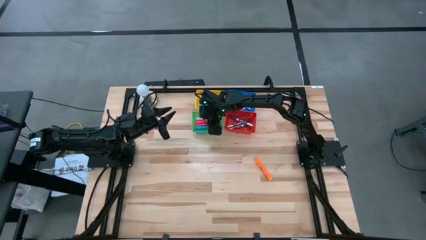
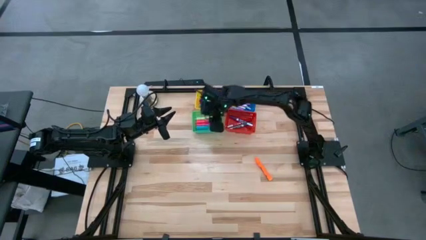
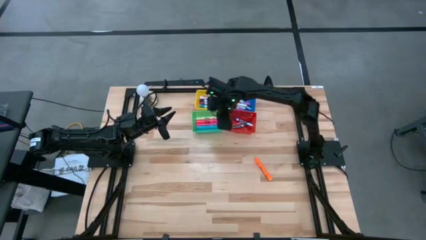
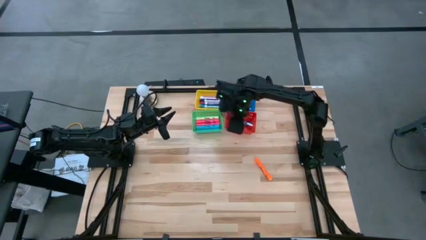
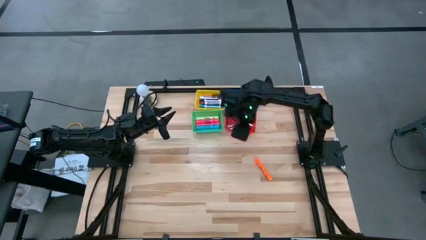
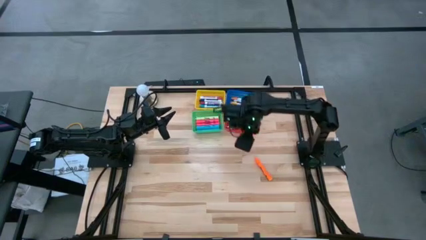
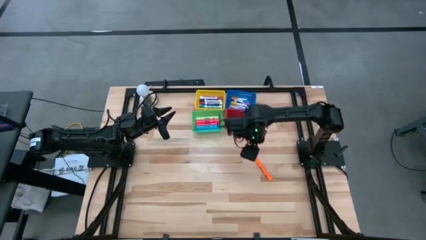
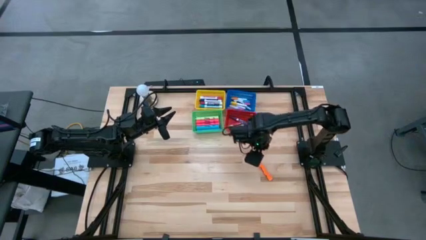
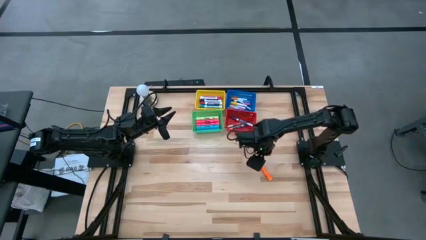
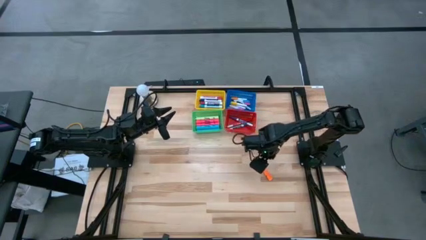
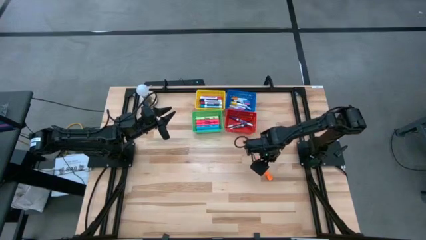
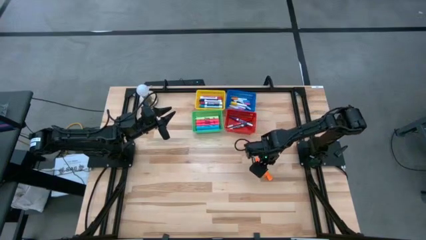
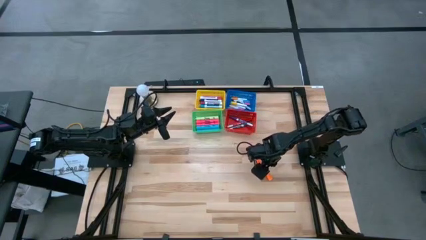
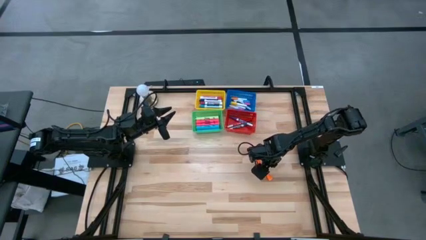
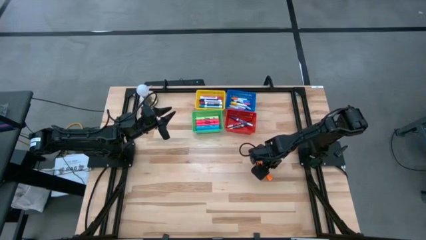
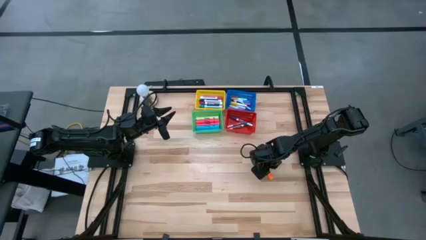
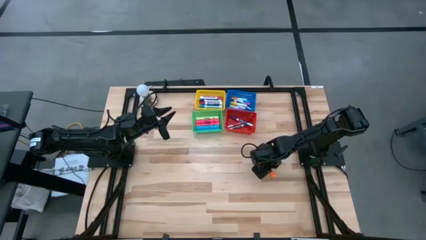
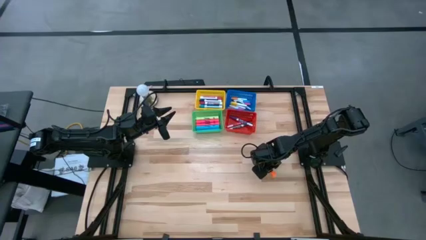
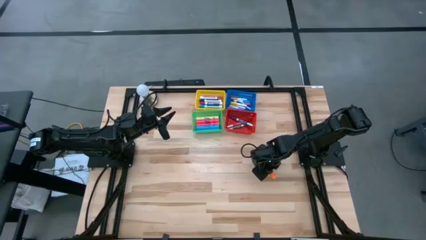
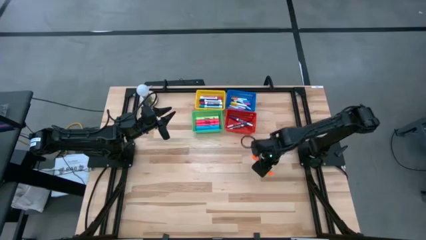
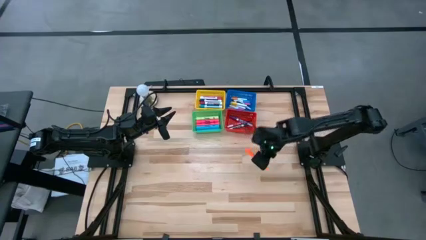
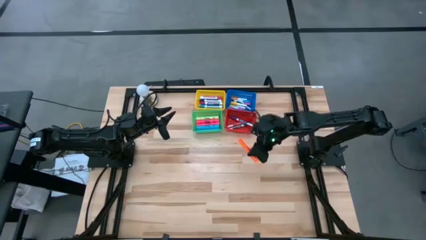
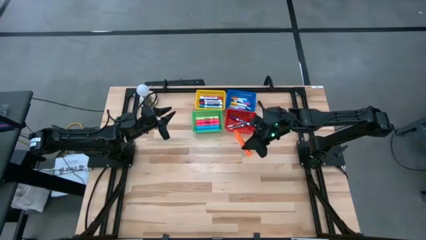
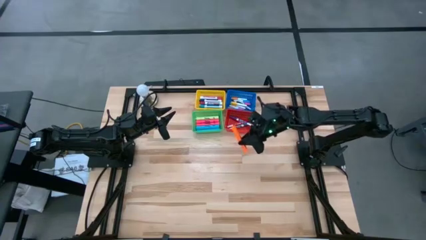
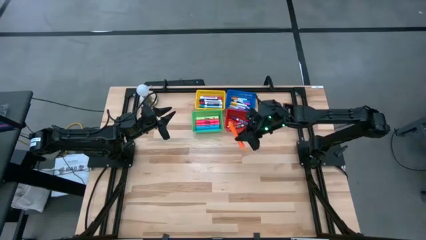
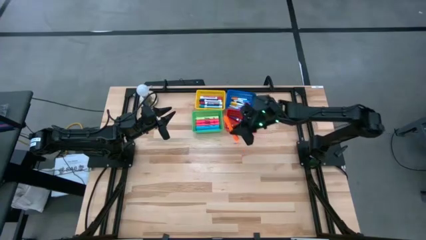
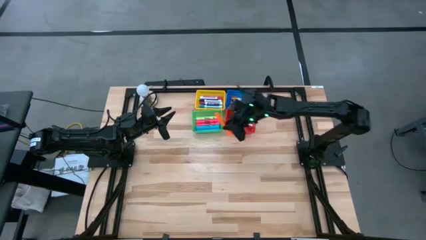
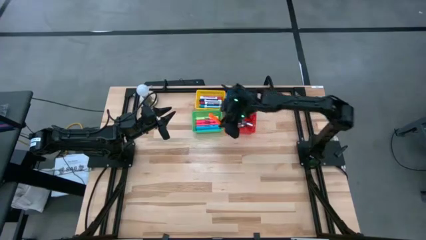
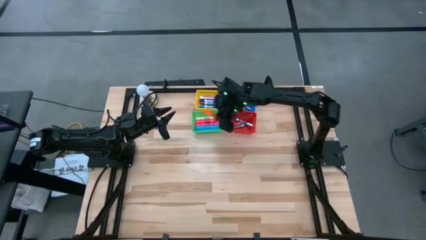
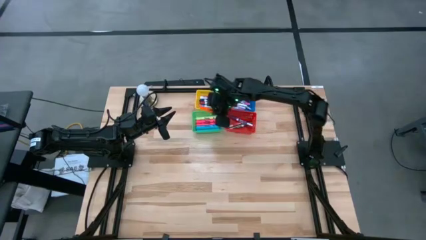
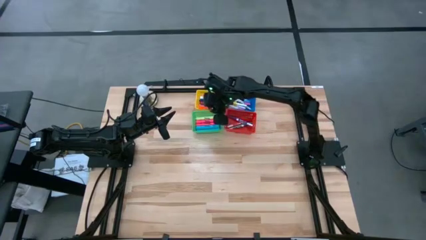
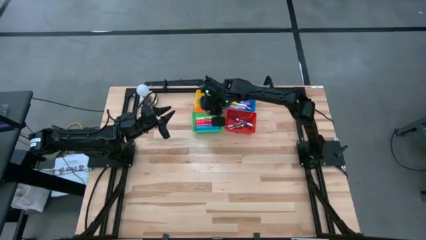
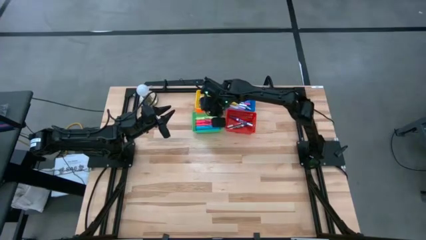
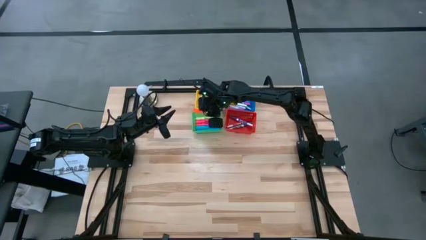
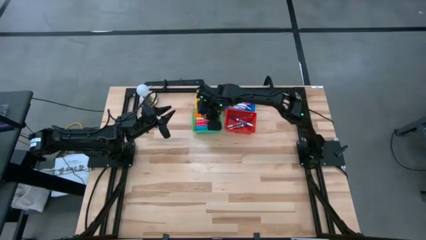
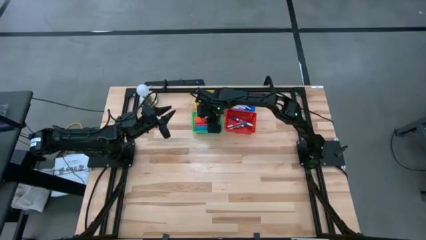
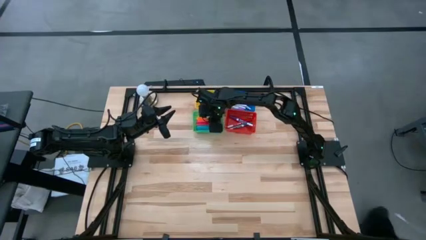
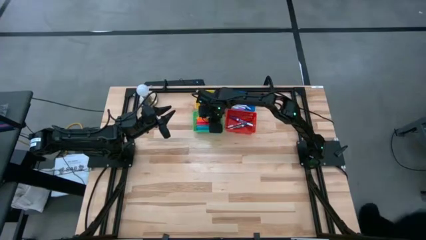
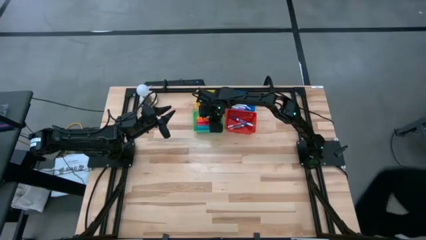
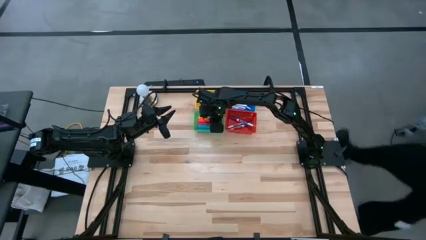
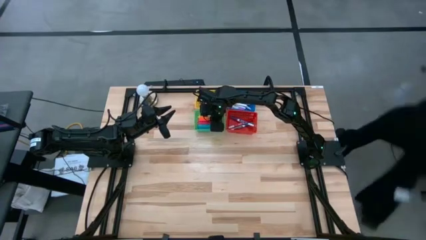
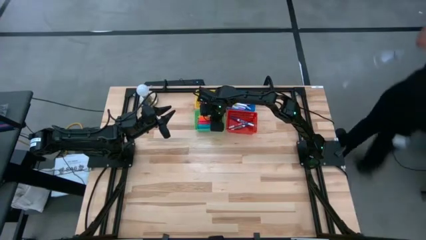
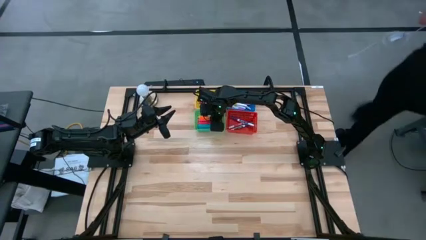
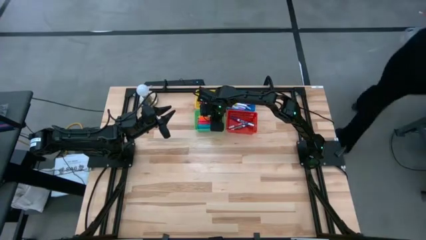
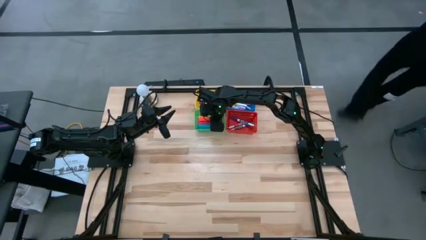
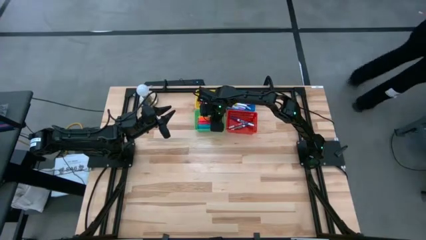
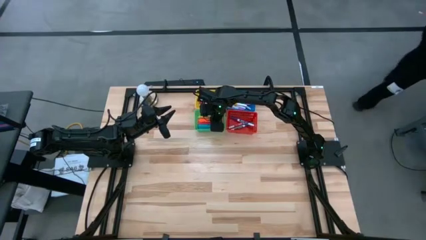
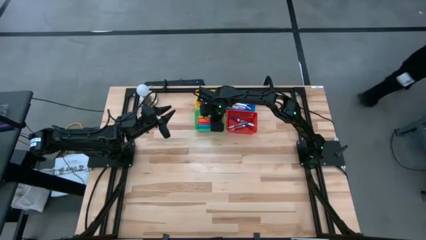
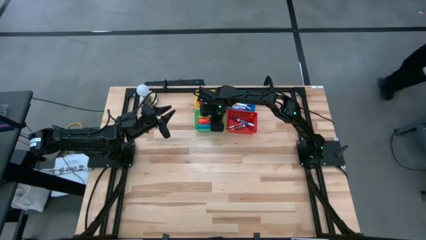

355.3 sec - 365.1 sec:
Task: Pick & Place Markers
Put the large orange highlighter pen into the green bin
